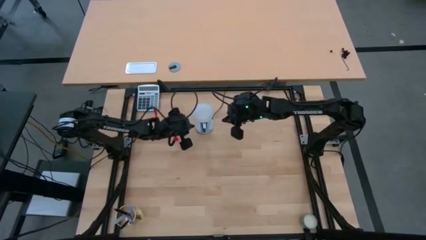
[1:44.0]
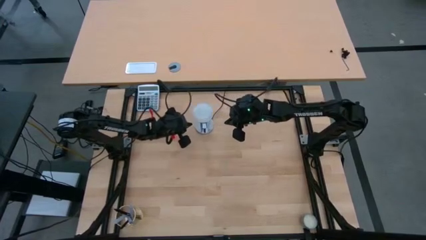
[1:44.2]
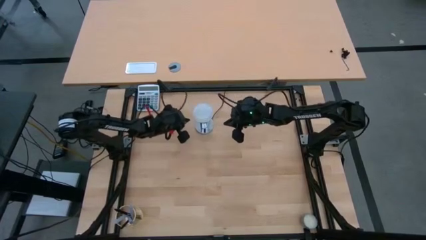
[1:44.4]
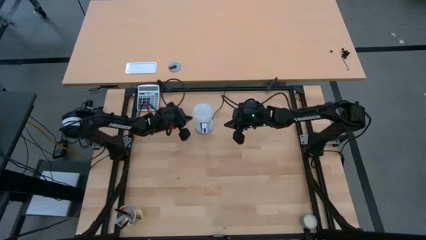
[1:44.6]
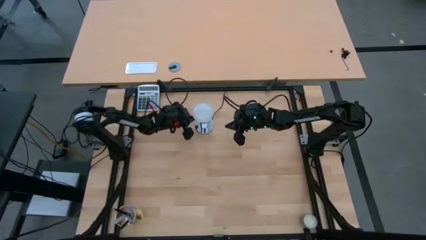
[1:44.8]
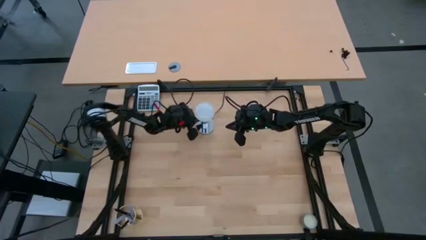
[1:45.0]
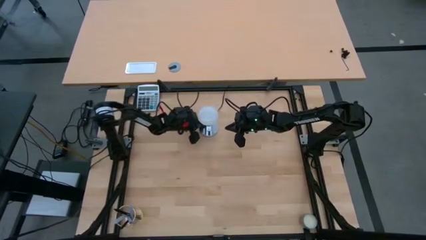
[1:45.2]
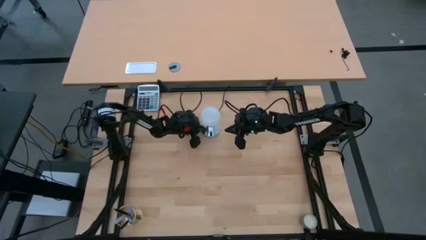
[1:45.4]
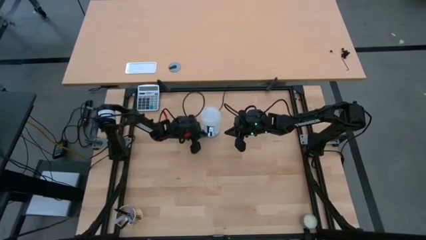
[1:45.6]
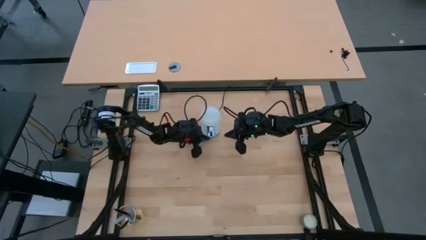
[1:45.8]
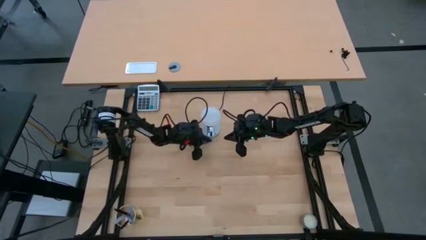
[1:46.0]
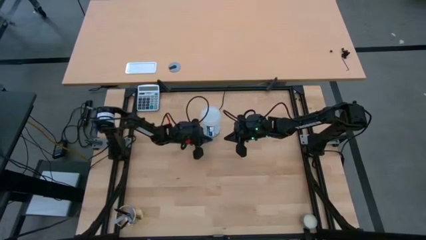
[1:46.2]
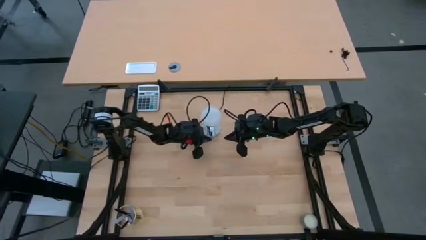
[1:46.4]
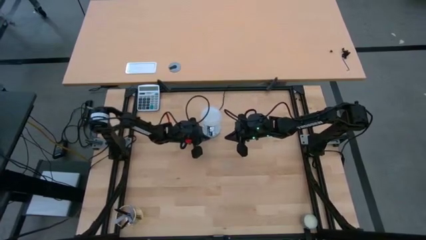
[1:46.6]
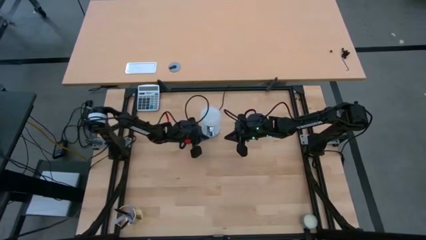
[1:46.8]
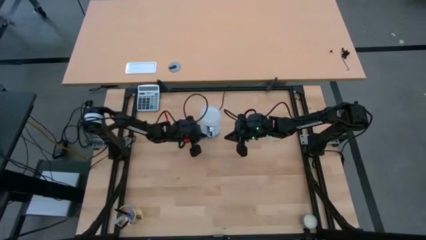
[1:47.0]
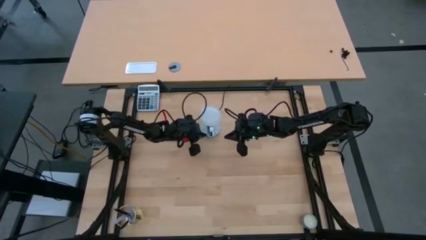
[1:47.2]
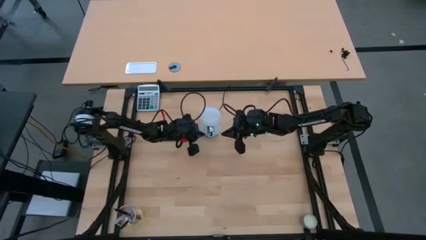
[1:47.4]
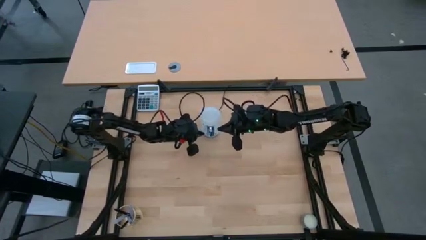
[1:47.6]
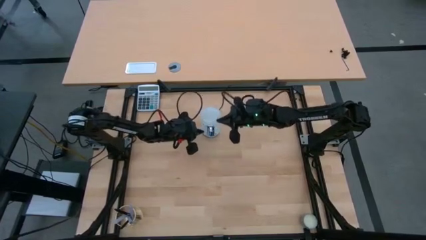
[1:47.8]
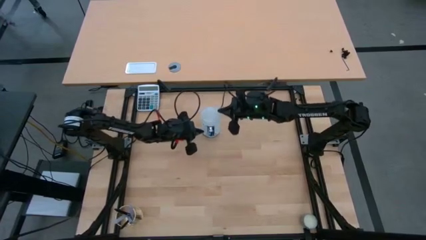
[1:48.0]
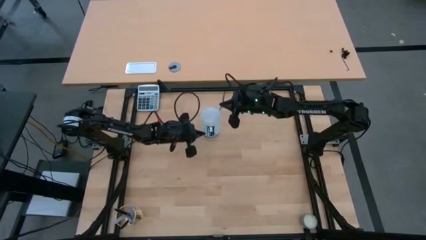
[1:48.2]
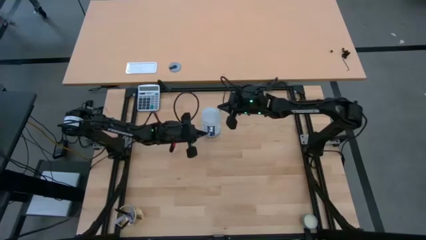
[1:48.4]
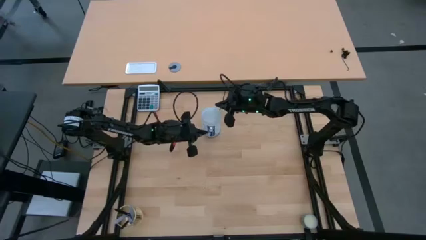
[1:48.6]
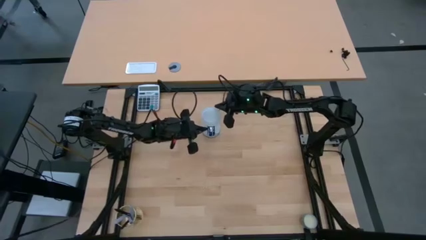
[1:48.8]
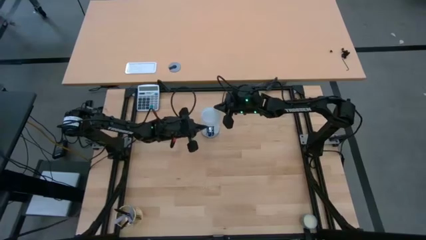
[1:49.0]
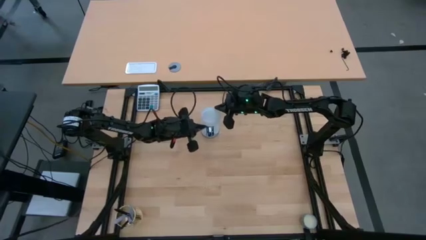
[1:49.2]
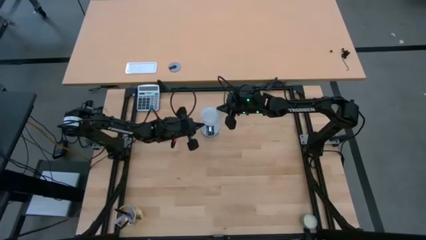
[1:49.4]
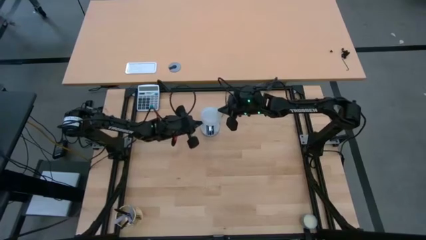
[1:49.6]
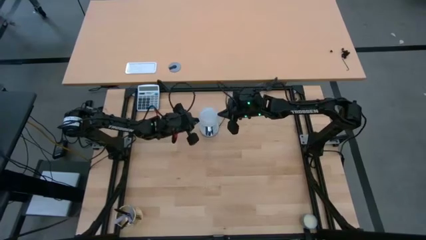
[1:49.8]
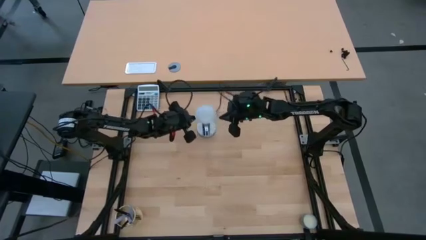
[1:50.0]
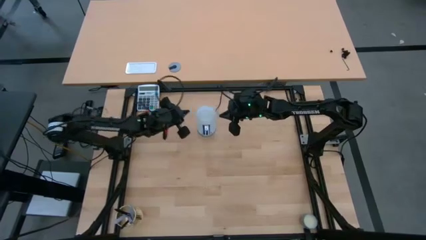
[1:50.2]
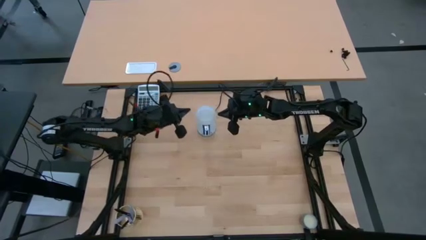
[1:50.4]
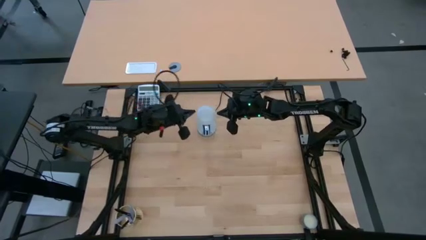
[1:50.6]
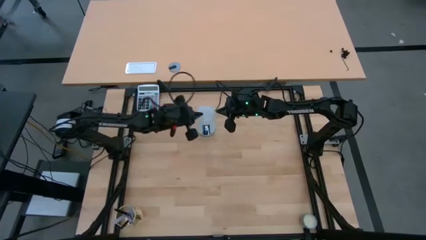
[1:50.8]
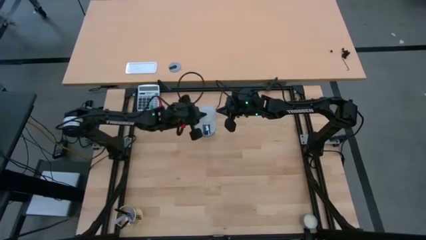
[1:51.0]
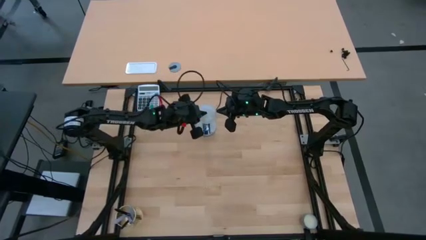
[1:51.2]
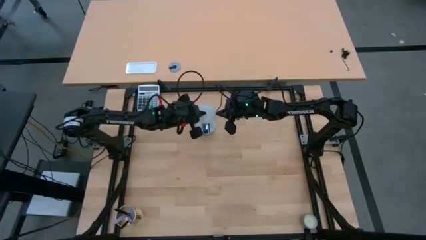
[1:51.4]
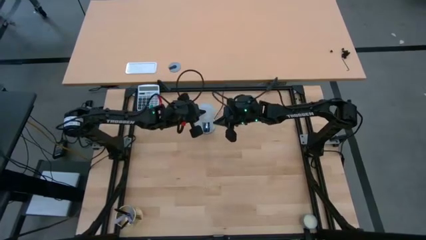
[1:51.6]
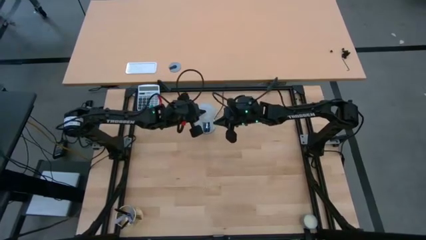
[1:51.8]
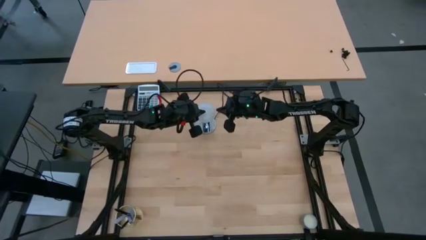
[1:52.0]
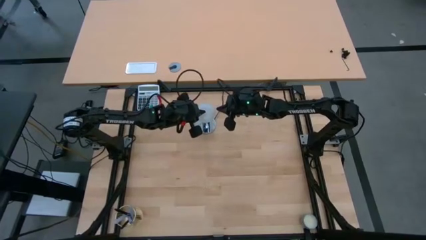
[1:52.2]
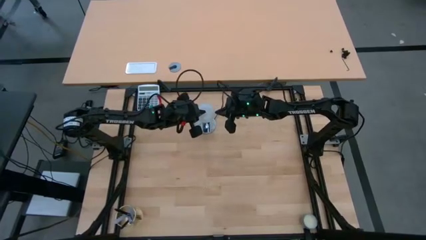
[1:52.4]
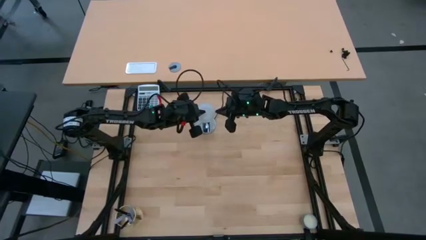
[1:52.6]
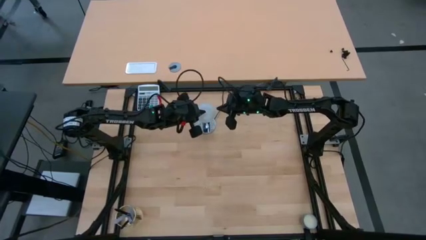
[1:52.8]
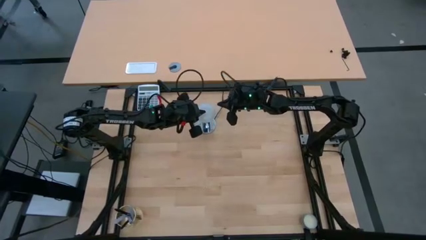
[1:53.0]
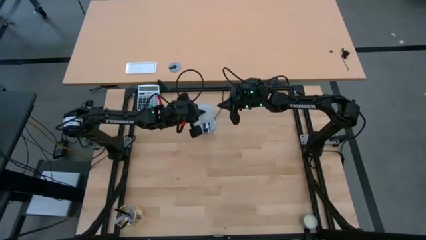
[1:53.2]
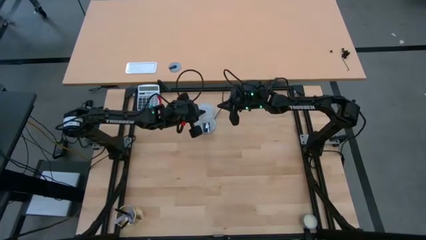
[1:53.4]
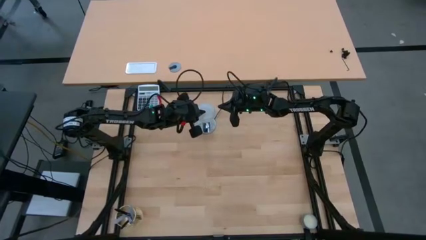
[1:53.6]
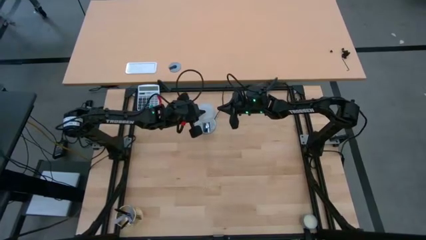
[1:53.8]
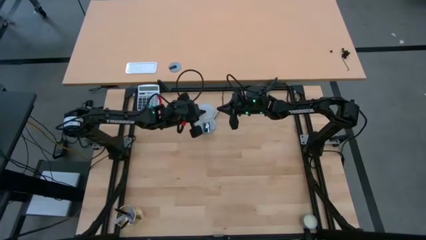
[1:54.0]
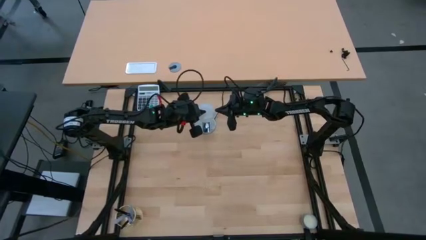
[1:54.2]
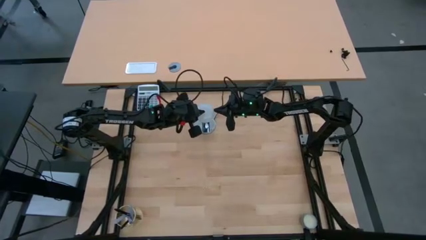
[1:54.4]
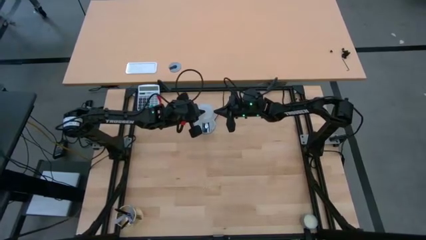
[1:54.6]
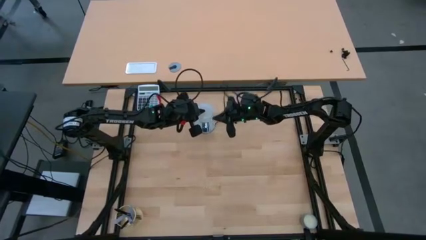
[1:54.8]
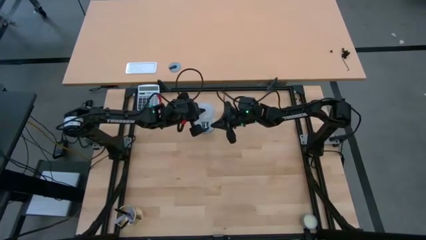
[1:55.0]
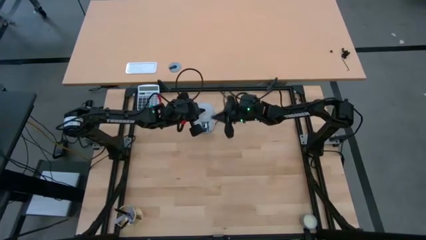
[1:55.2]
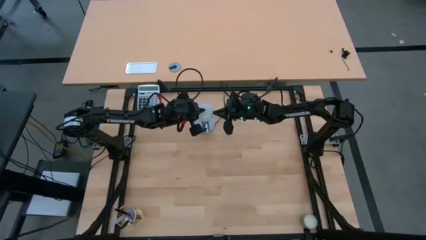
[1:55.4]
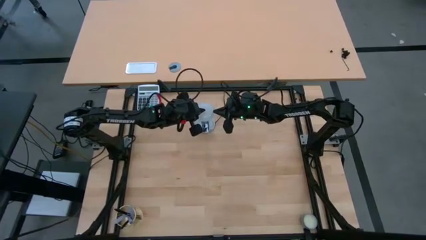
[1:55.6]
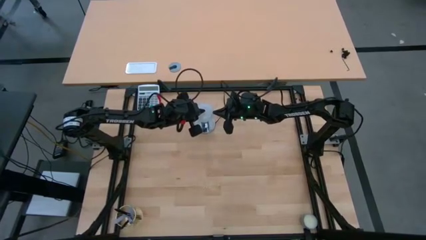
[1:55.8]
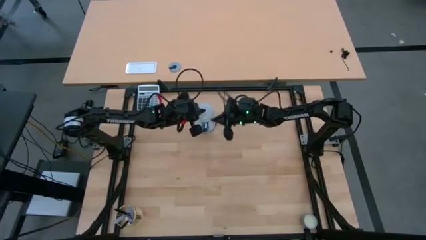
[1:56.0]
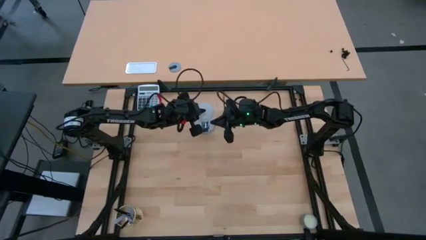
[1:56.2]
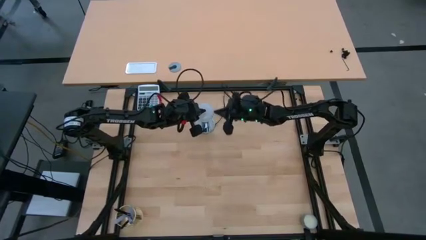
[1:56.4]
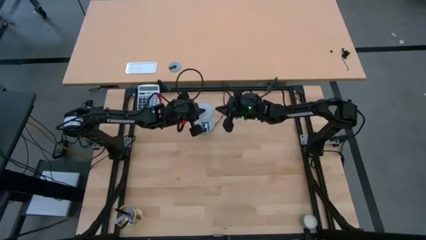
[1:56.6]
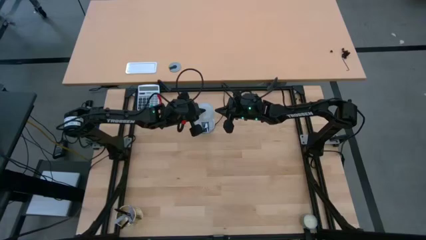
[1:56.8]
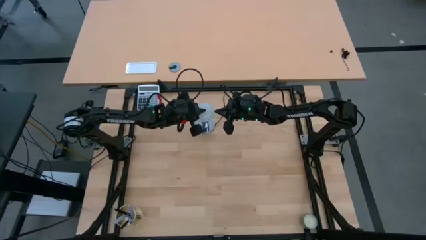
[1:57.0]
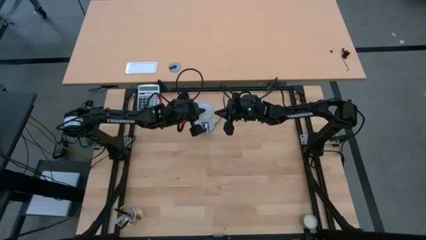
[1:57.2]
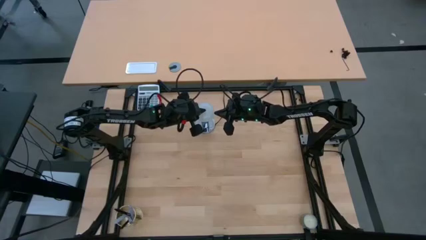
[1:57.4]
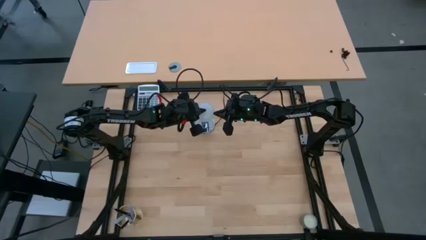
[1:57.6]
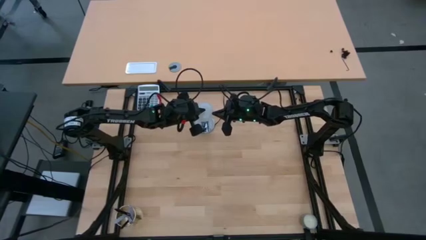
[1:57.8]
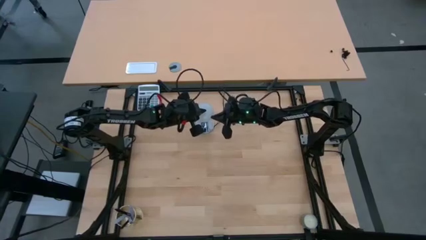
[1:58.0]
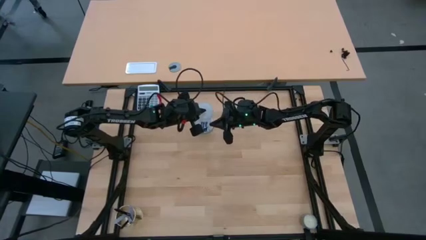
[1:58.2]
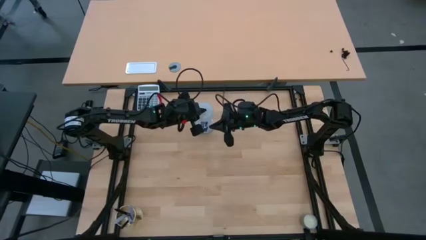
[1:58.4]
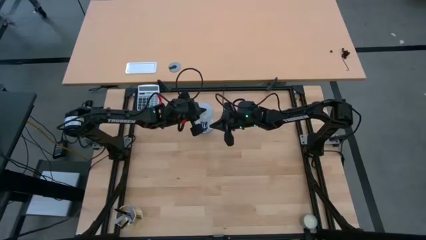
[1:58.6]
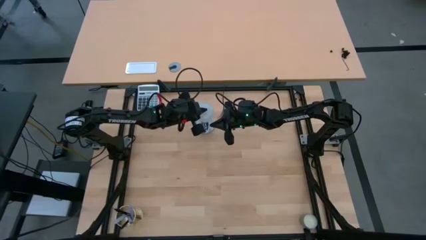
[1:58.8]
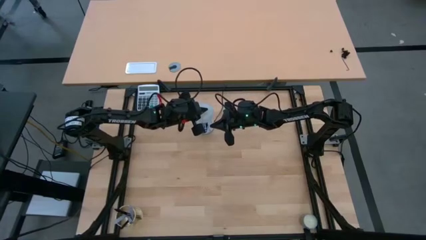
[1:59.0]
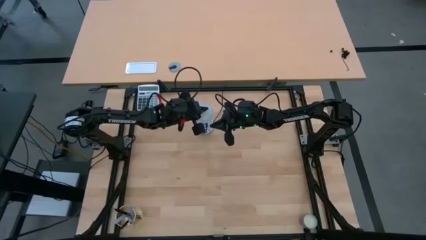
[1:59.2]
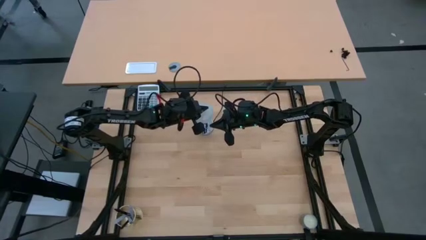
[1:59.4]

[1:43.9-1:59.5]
Task: Screw lightbulb
Remove the lightbulb from the lamp
